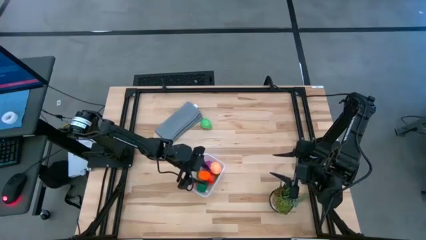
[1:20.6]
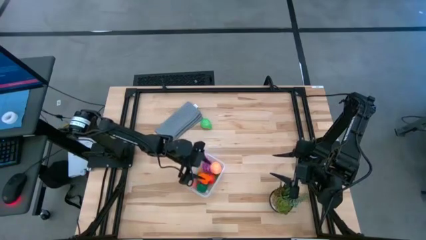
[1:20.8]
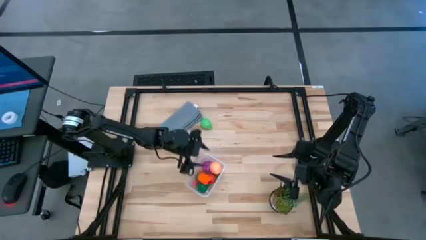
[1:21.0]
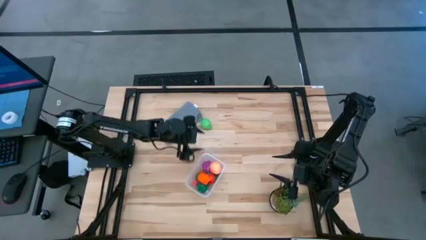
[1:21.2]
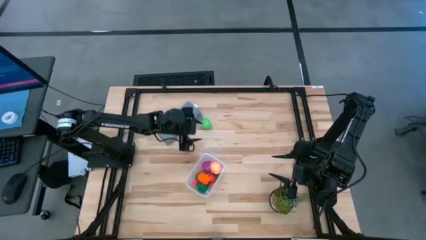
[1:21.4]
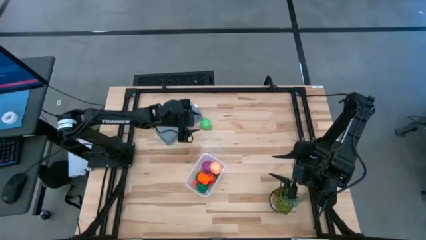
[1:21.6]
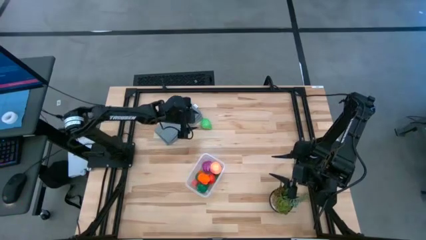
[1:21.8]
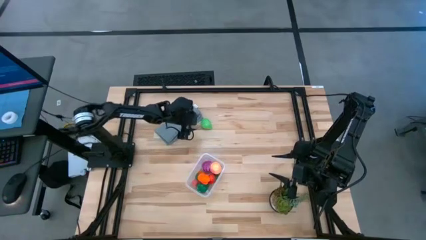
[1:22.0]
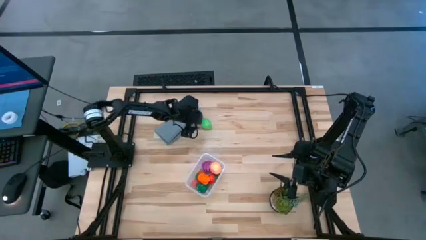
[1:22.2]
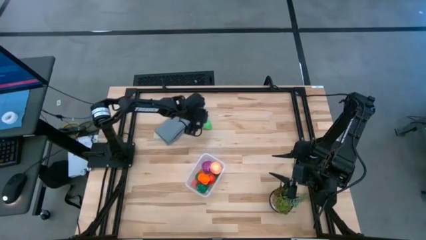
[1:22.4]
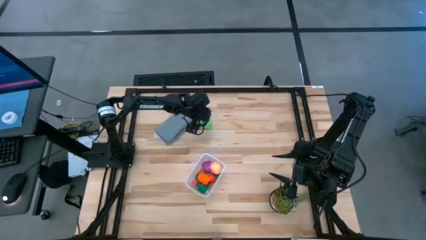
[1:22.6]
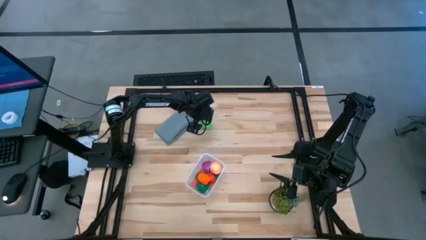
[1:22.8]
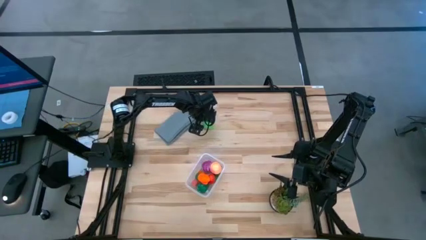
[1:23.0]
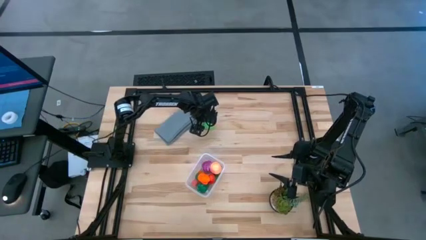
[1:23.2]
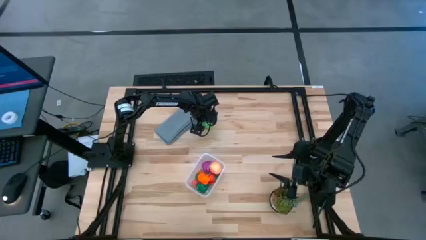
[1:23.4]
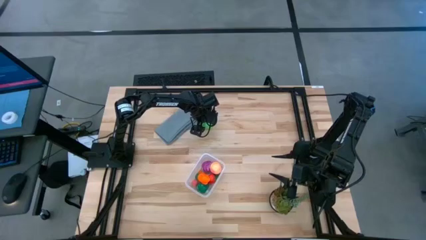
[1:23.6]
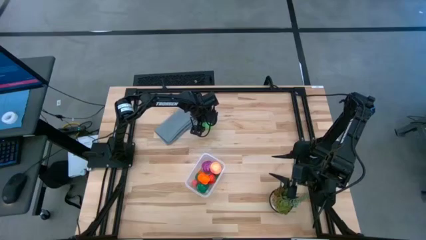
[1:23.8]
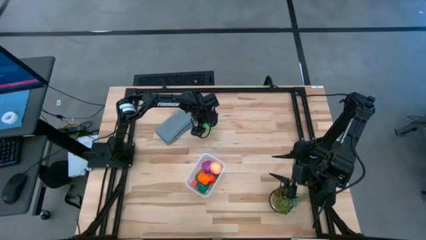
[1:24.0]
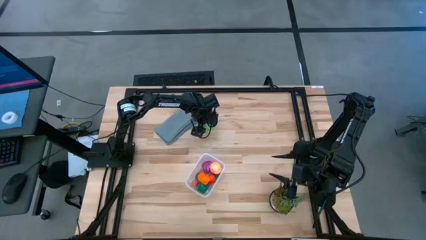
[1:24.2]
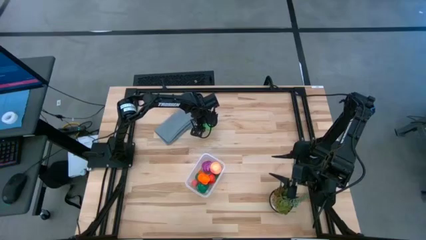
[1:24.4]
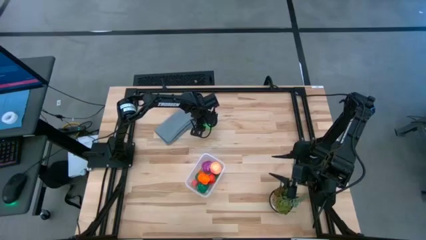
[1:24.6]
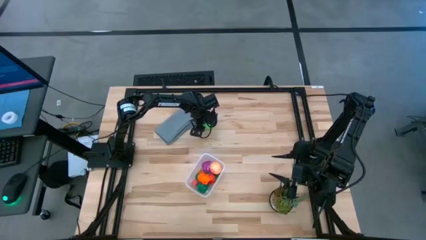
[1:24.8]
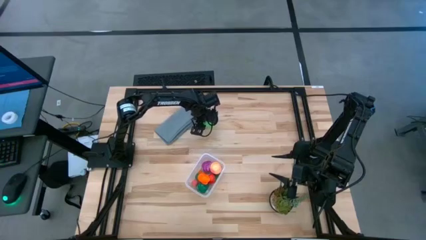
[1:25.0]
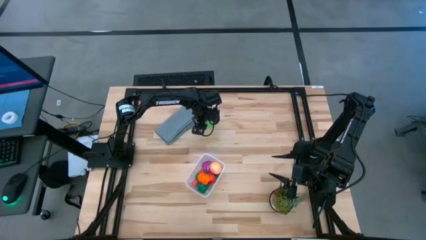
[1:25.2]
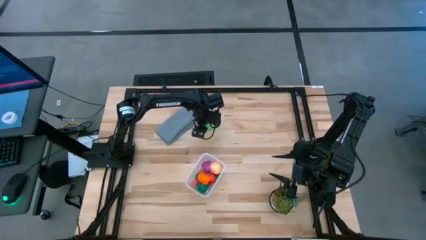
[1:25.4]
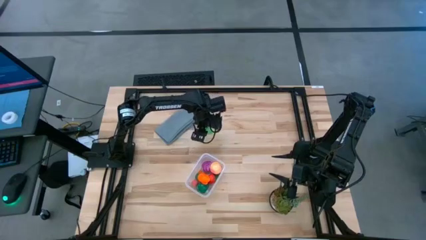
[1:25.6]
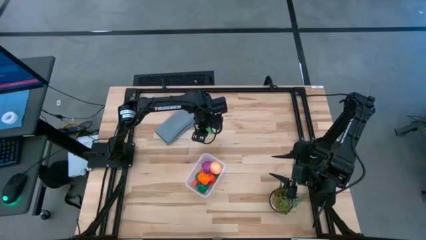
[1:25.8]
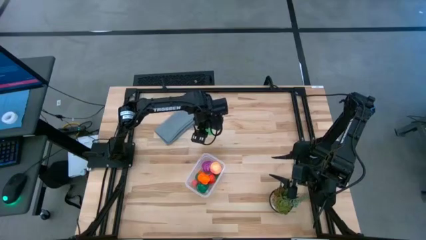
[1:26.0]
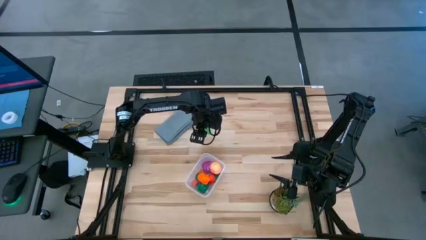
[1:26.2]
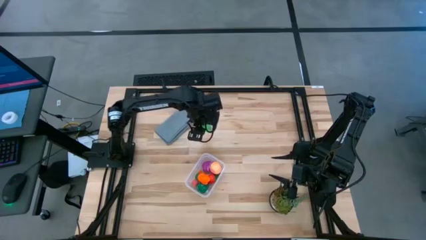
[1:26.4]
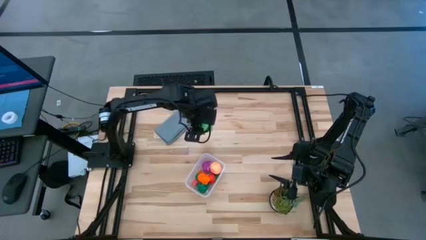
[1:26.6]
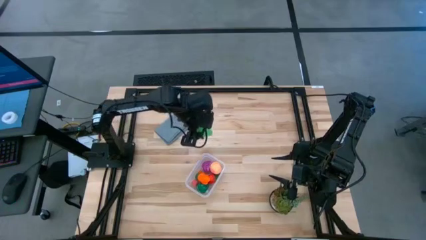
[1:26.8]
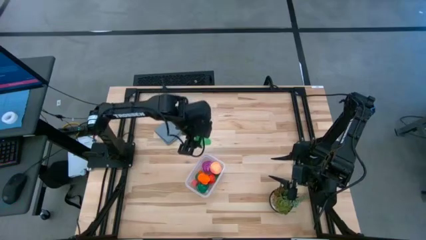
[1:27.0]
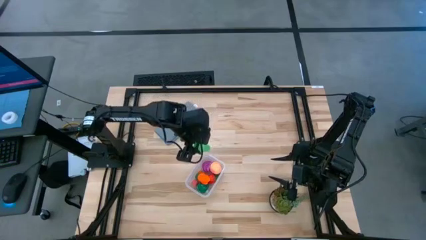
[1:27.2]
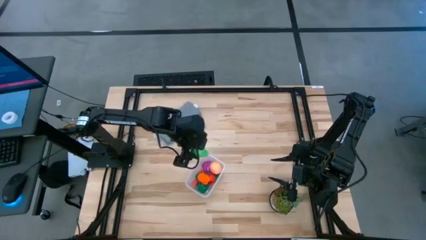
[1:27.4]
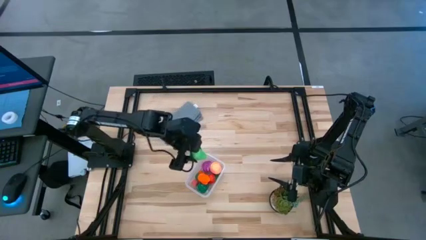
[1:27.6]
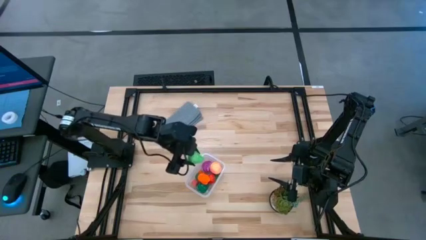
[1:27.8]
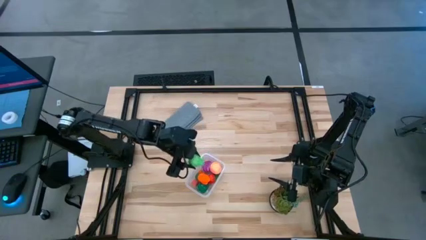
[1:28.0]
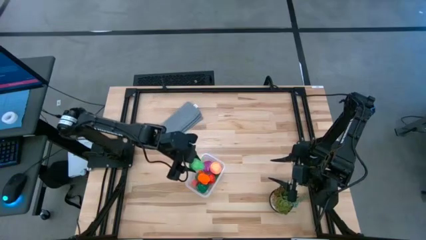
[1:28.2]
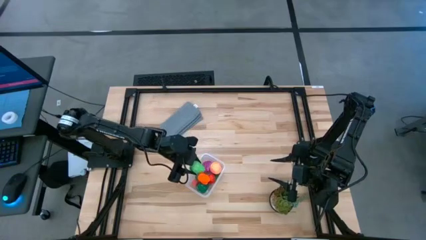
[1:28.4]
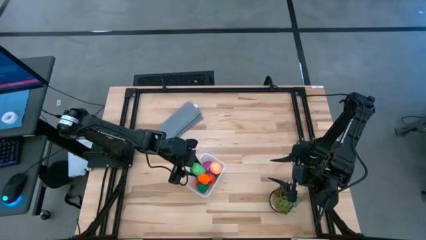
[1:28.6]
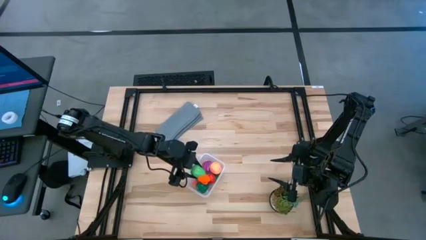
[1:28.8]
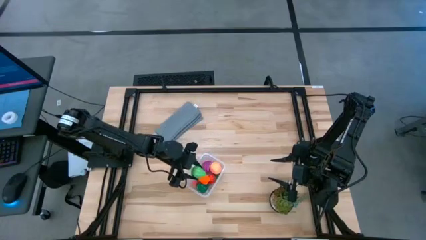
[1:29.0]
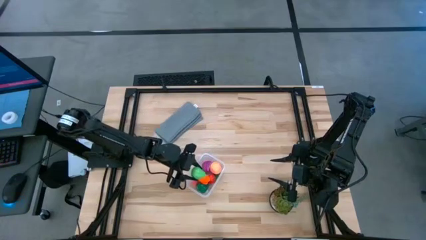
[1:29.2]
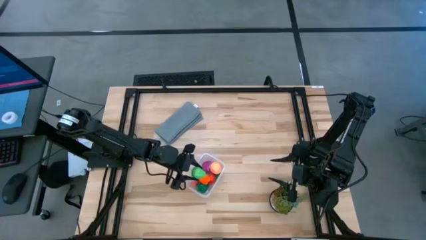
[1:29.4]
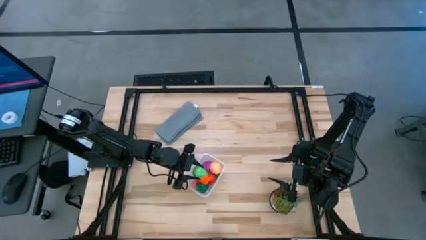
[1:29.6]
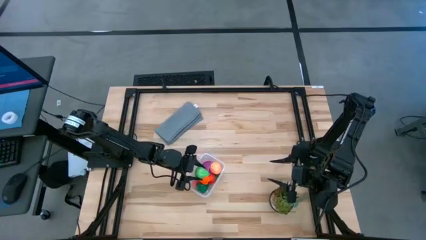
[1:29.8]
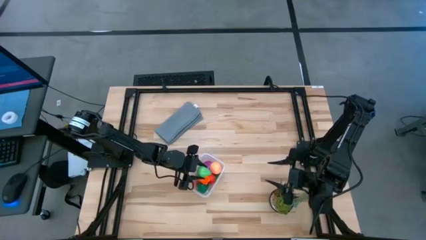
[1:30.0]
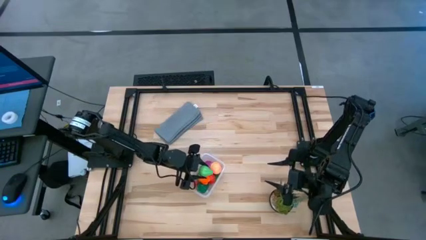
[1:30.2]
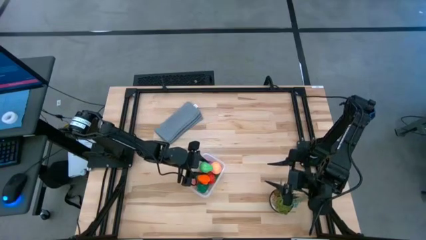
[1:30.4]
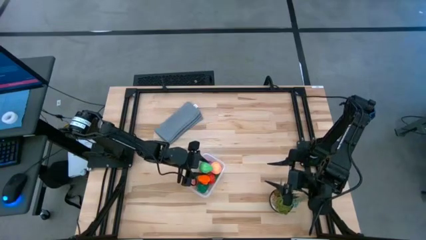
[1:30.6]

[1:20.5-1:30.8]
Task: Pick and placing Produce into tupperware
Put the green pear into the transparent bin

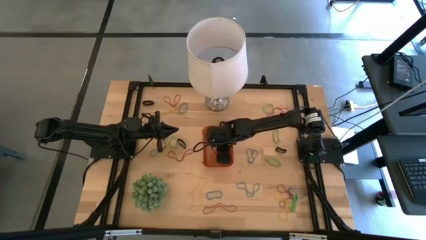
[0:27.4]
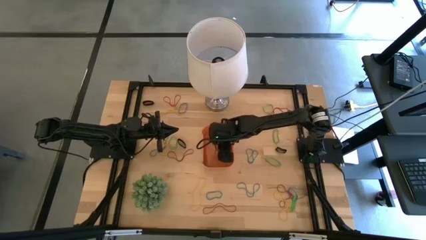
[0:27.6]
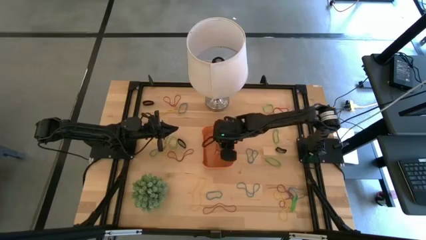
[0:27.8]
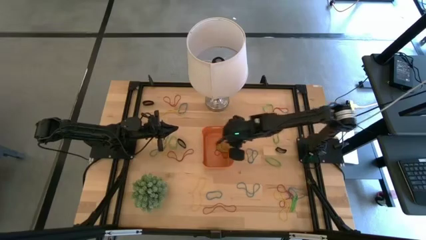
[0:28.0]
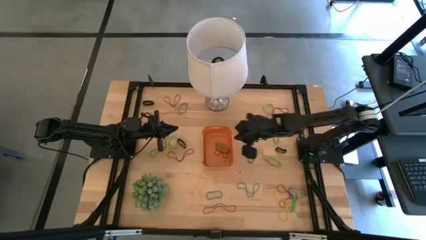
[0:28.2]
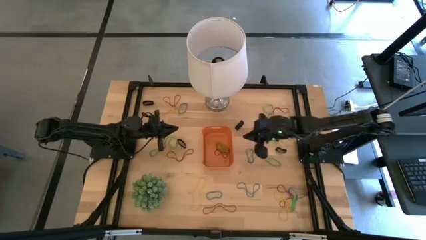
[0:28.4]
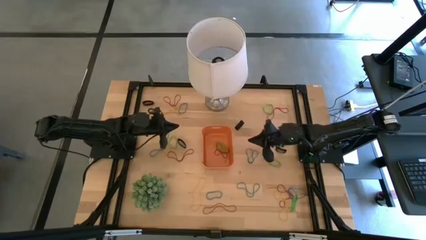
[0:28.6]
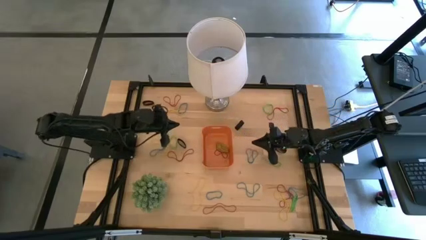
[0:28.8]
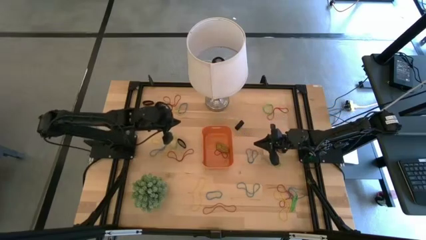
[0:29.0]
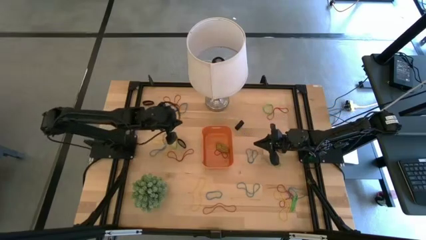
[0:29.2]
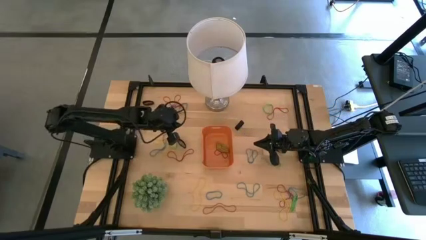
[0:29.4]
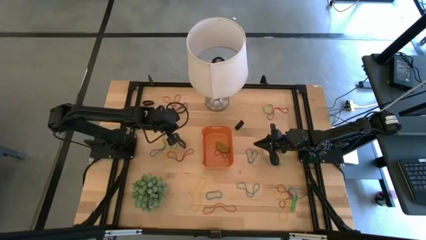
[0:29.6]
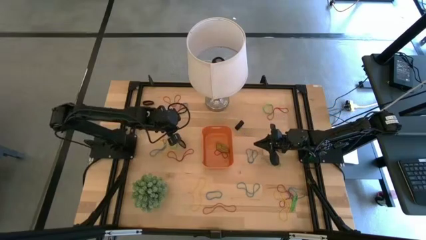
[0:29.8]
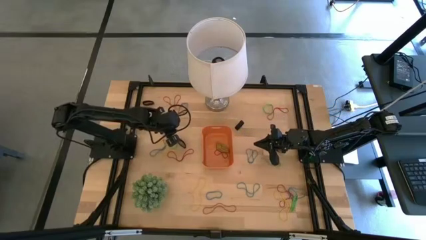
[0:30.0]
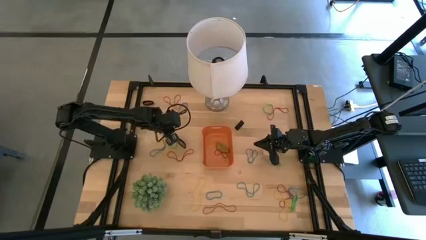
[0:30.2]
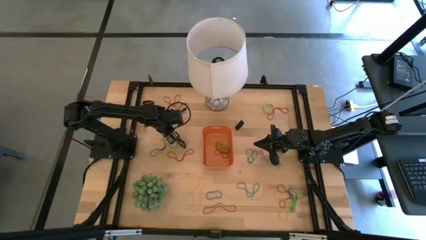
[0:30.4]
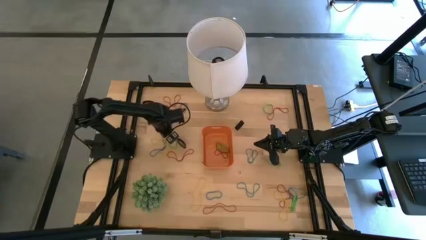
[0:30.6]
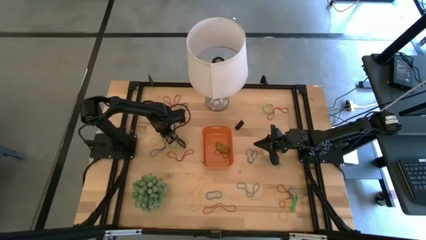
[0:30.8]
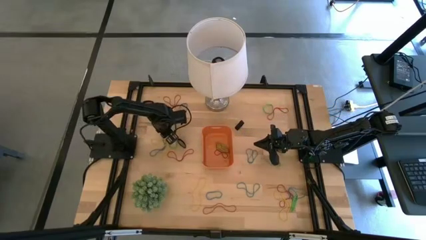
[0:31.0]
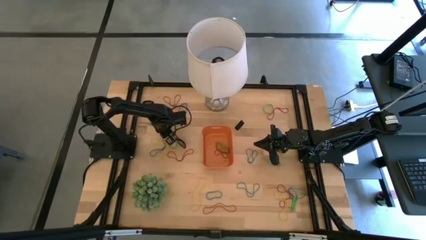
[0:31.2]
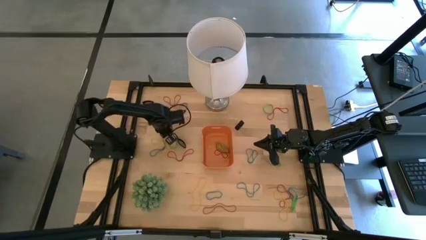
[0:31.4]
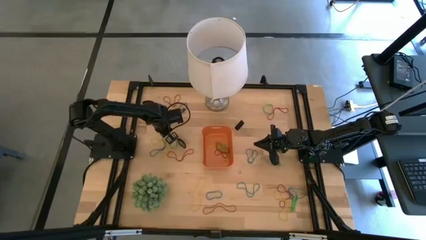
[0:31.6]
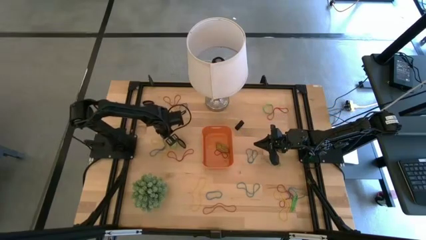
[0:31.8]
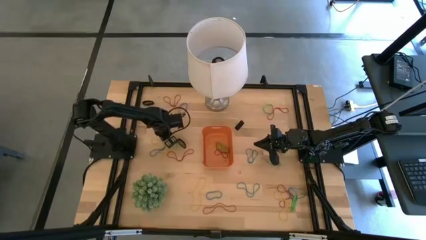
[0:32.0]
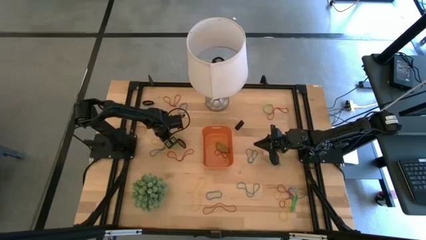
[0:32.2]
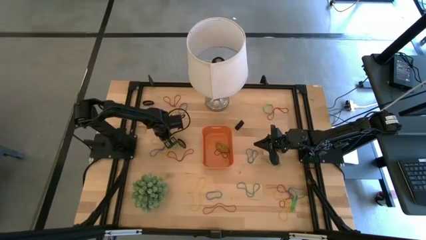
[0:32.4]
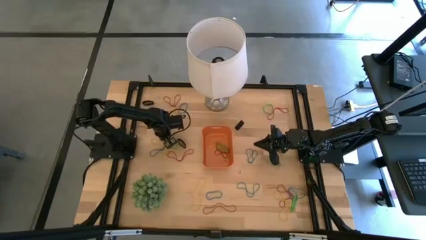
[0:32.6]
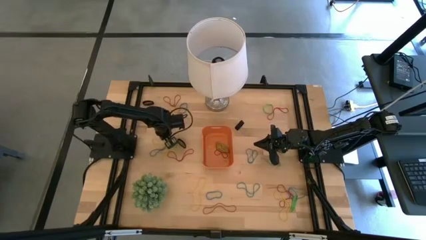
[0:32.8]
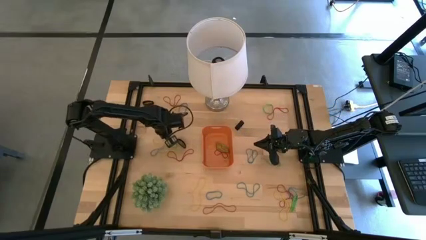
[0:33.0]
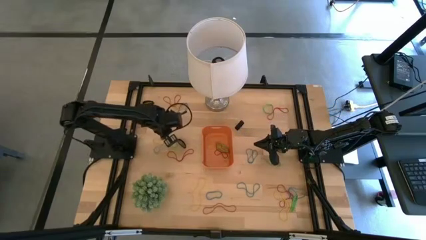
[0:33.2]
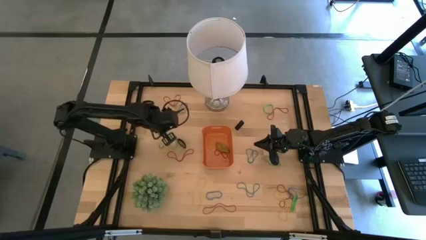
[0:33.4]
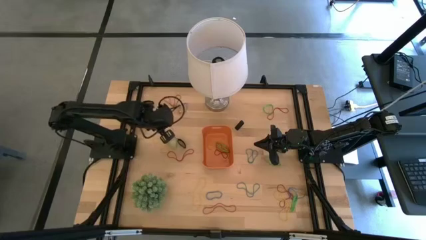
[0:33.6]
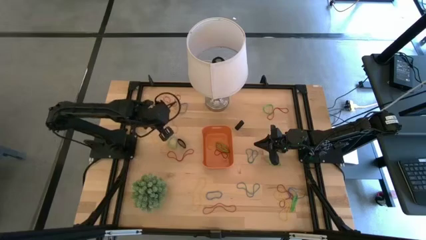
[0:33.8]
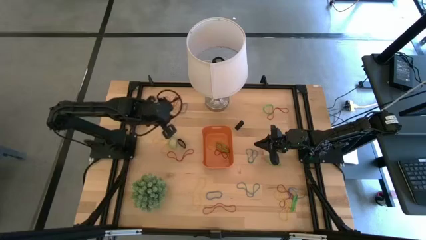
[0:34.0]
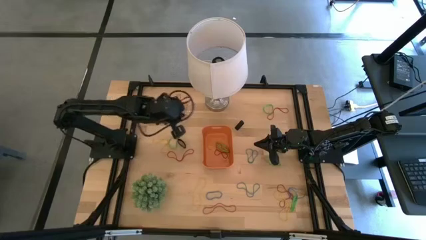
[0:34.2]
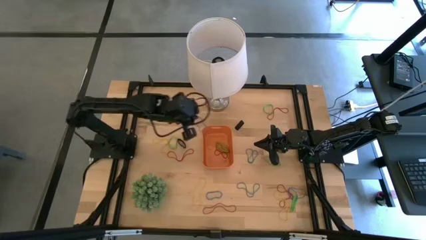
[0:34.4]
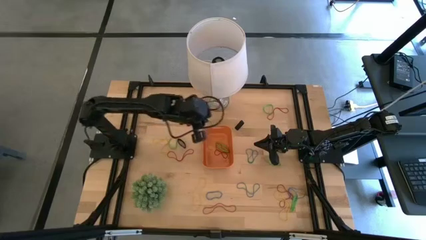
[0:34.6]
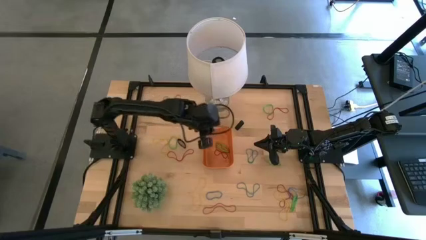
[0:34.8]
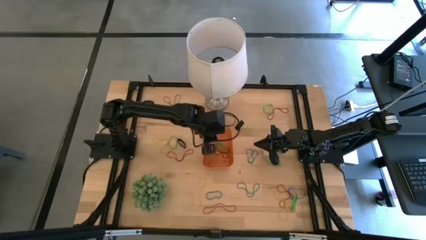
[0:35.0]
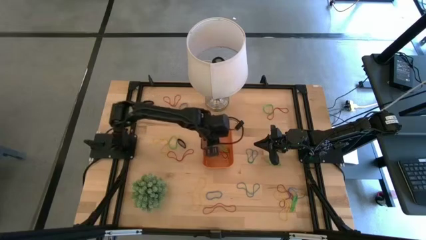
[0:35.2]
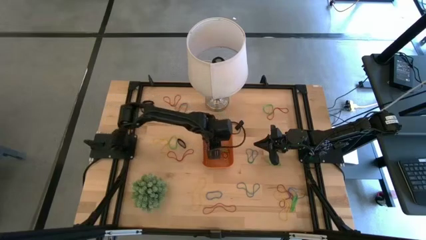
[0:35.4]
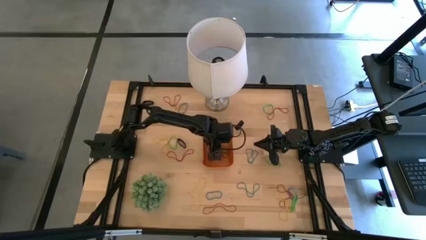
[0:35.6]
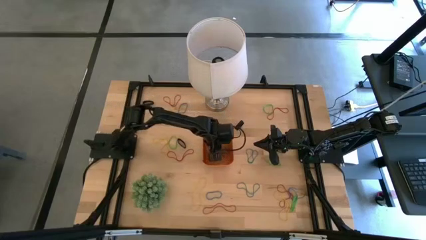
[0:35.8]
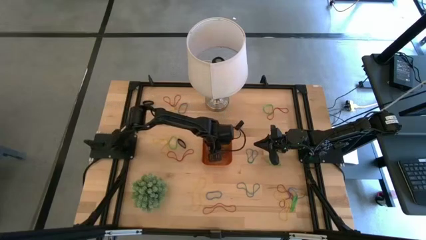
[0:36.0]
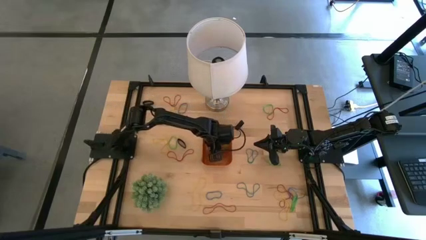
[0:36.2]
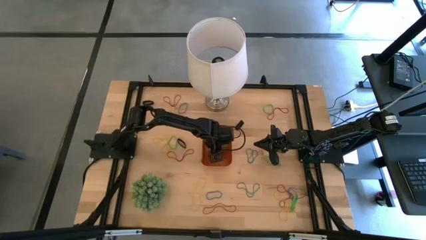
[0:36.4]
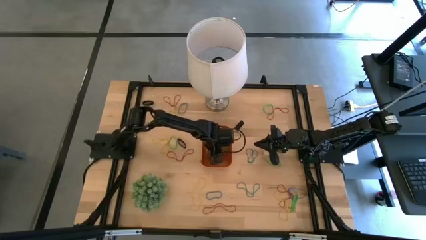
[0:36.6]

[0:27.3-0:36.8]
Task: Pick and place rubber bands into bin
Put the blue rubber band into the orange bin
